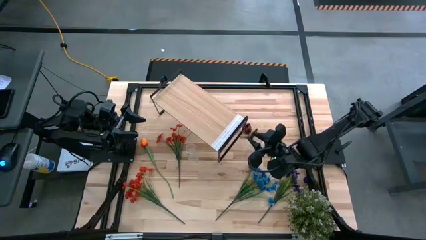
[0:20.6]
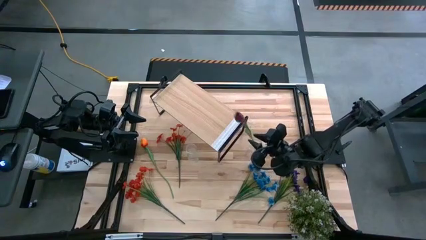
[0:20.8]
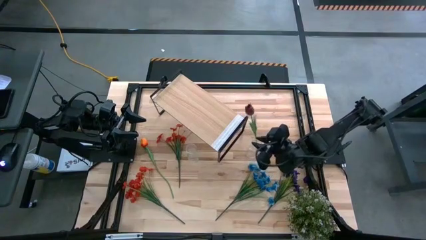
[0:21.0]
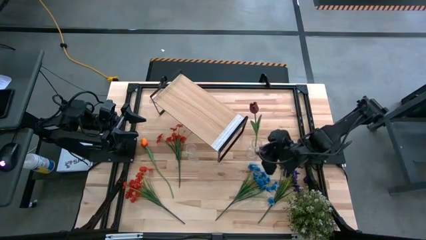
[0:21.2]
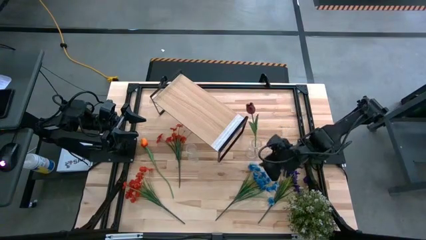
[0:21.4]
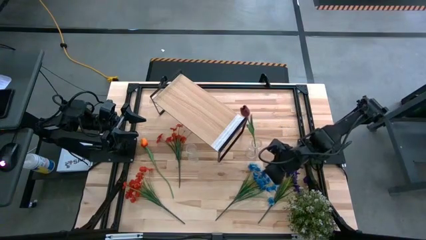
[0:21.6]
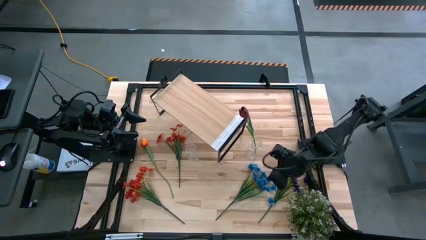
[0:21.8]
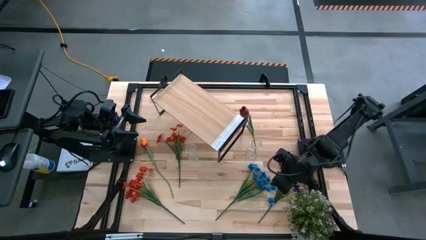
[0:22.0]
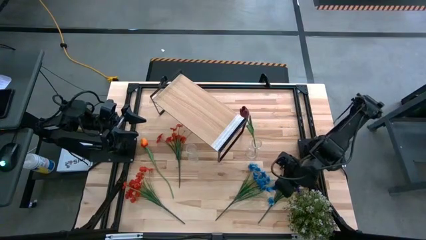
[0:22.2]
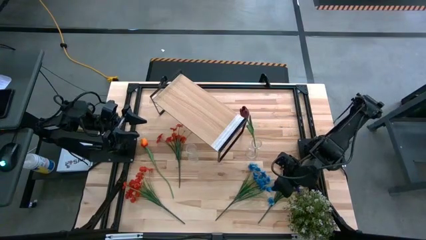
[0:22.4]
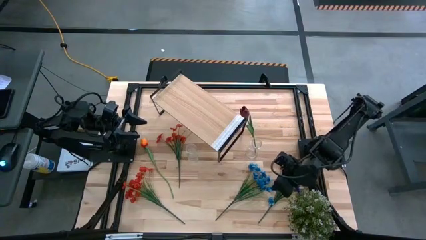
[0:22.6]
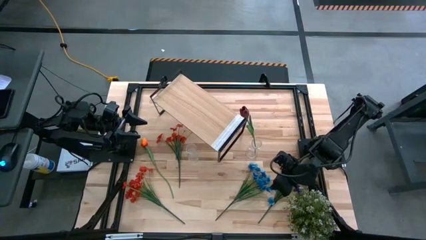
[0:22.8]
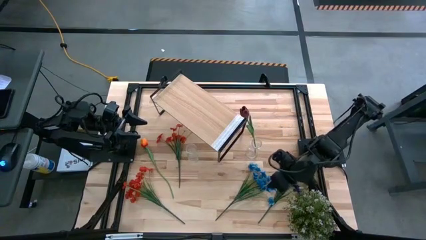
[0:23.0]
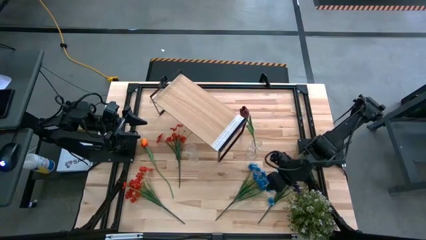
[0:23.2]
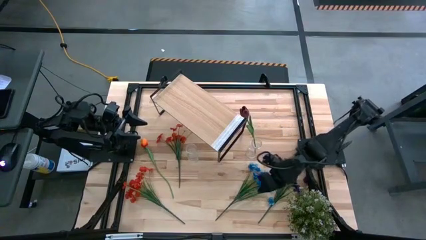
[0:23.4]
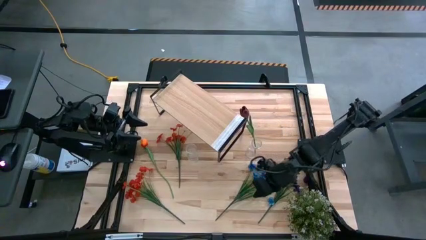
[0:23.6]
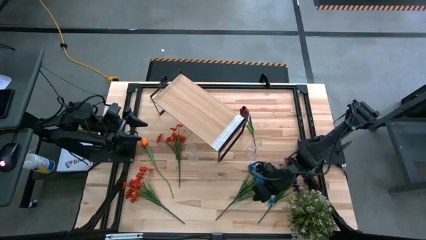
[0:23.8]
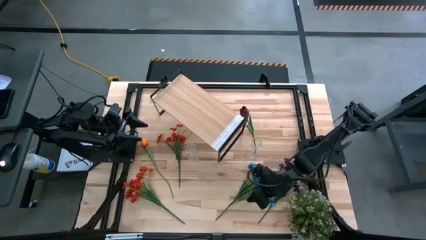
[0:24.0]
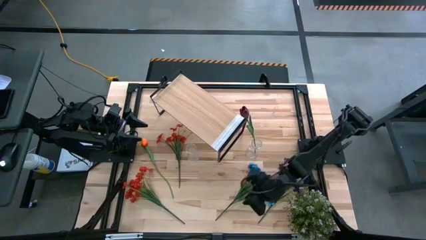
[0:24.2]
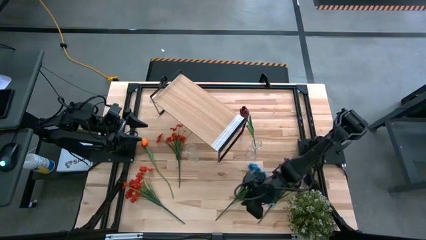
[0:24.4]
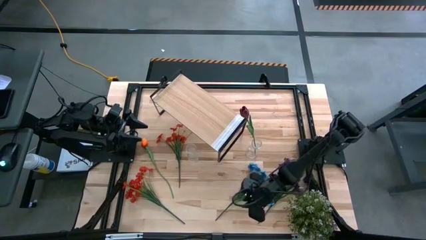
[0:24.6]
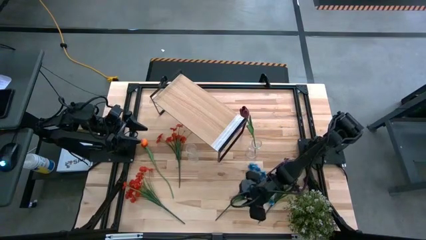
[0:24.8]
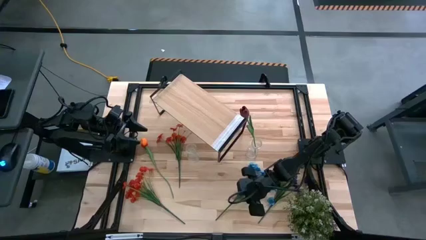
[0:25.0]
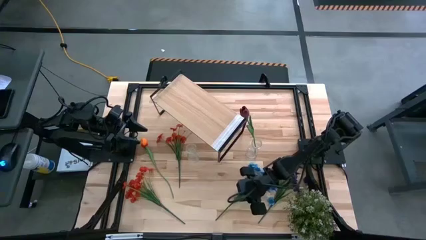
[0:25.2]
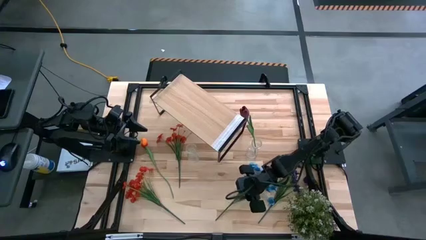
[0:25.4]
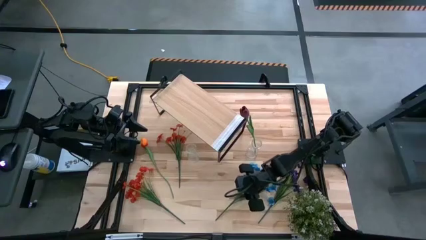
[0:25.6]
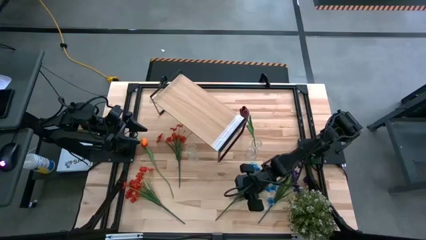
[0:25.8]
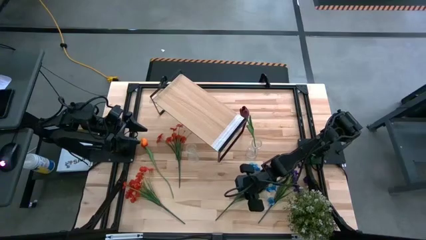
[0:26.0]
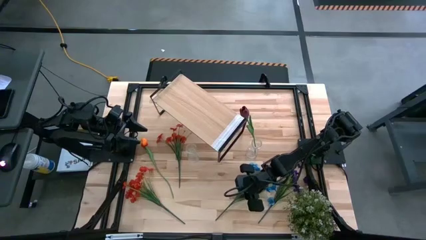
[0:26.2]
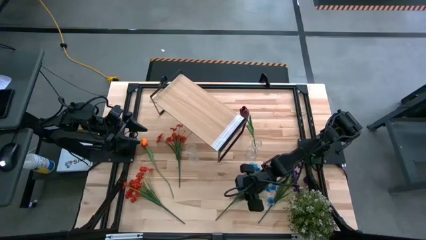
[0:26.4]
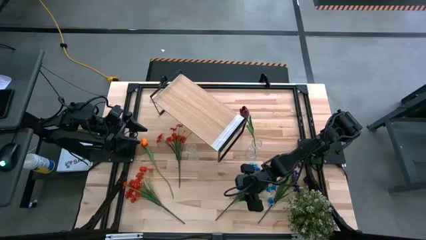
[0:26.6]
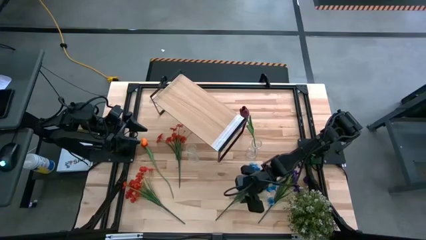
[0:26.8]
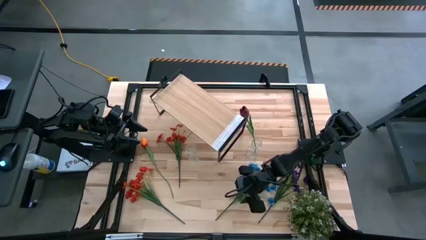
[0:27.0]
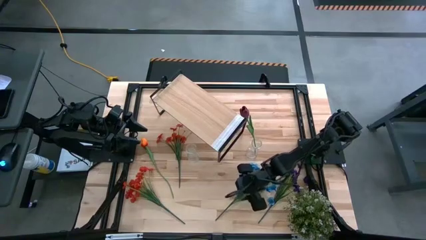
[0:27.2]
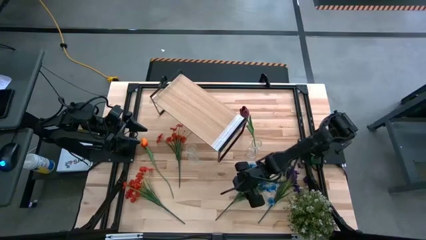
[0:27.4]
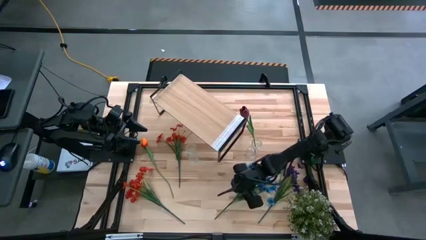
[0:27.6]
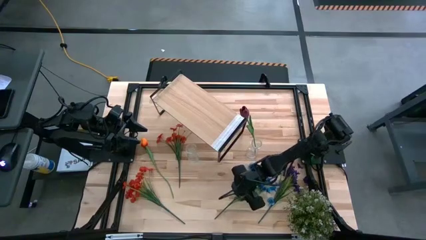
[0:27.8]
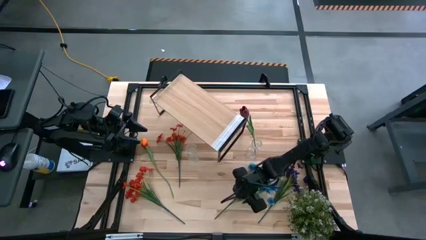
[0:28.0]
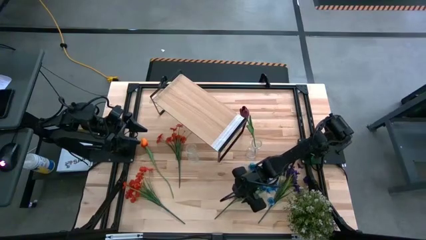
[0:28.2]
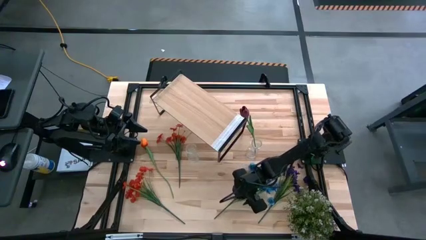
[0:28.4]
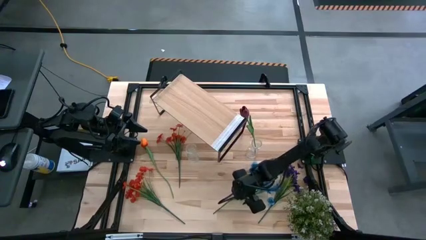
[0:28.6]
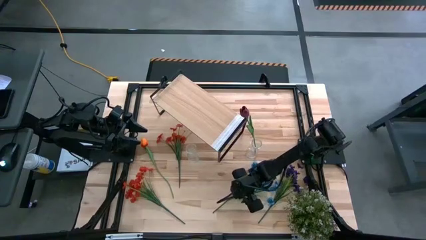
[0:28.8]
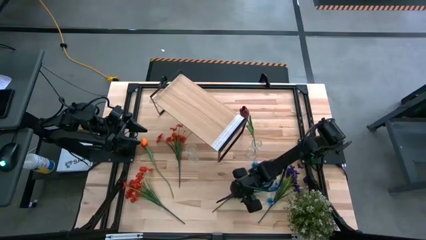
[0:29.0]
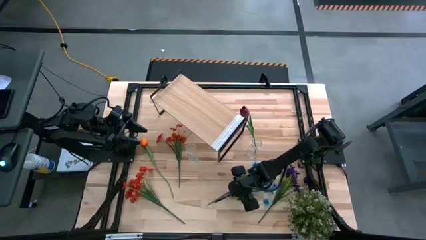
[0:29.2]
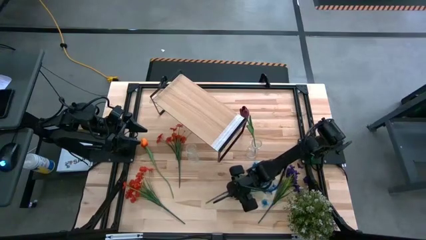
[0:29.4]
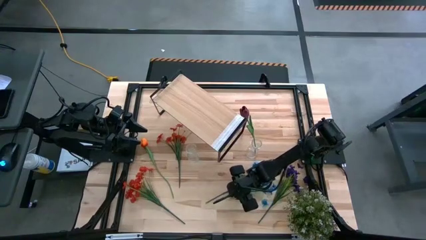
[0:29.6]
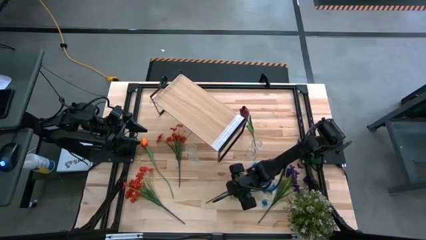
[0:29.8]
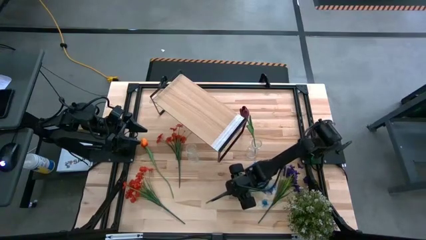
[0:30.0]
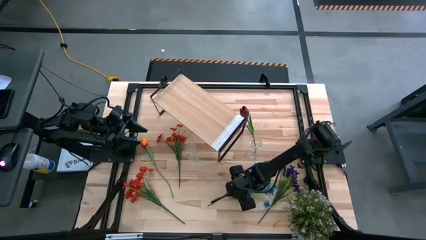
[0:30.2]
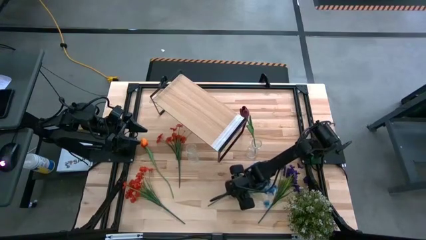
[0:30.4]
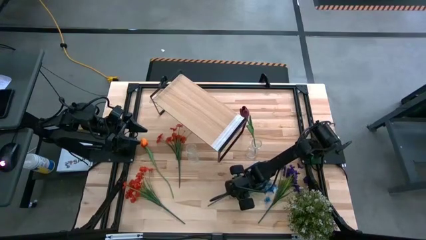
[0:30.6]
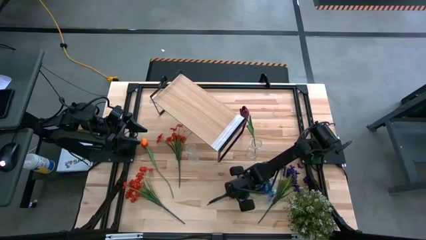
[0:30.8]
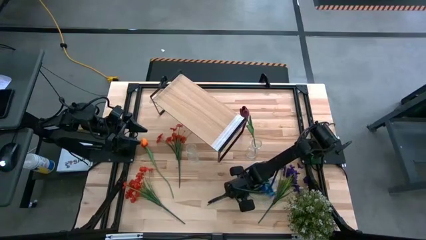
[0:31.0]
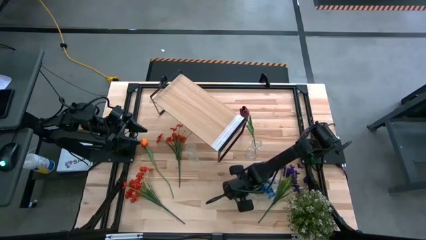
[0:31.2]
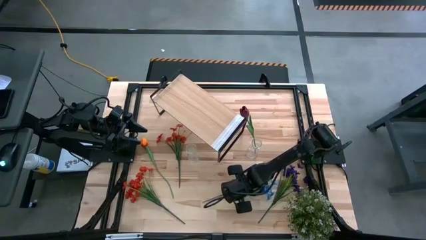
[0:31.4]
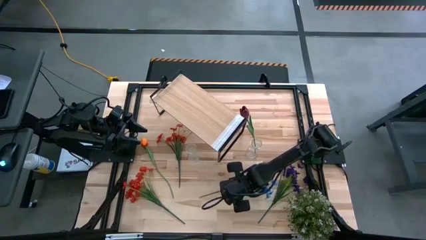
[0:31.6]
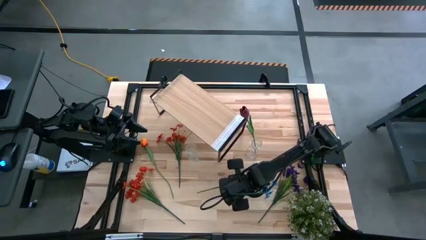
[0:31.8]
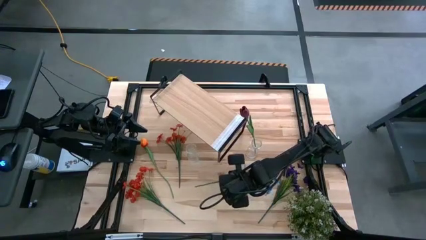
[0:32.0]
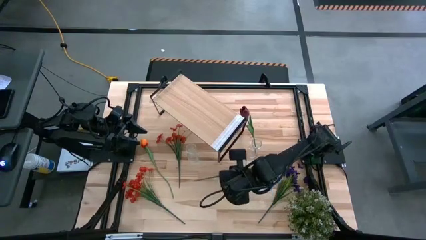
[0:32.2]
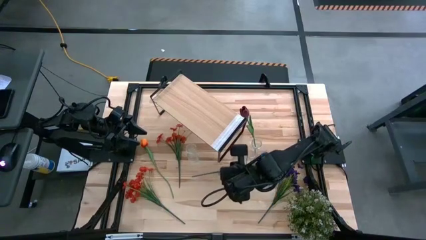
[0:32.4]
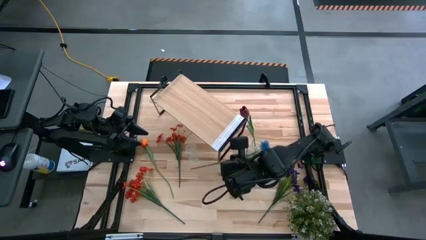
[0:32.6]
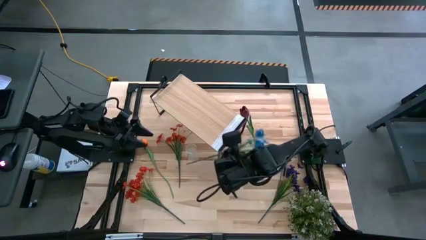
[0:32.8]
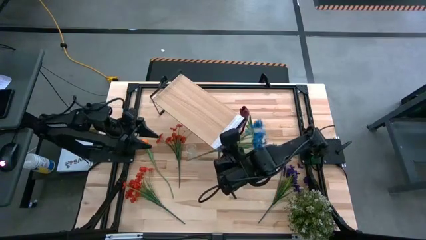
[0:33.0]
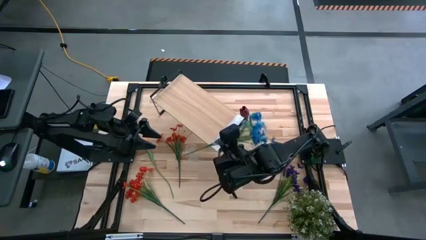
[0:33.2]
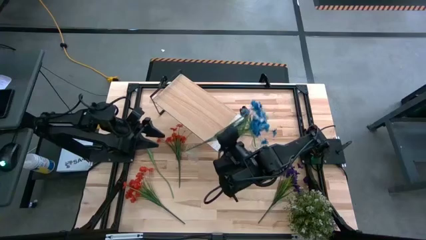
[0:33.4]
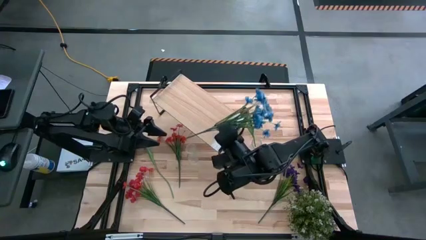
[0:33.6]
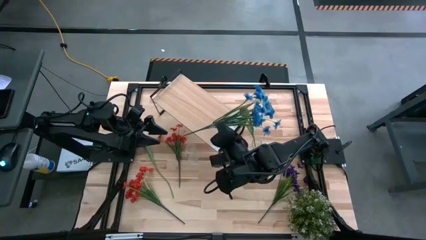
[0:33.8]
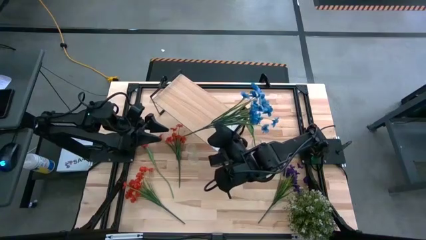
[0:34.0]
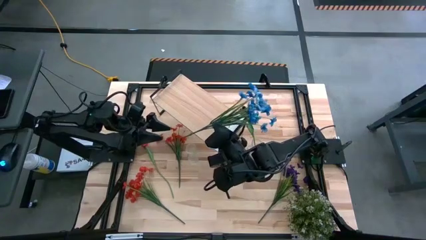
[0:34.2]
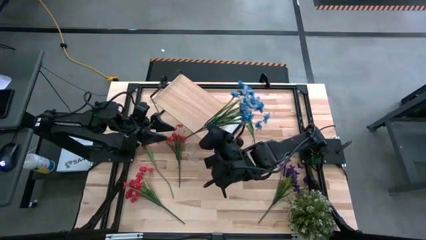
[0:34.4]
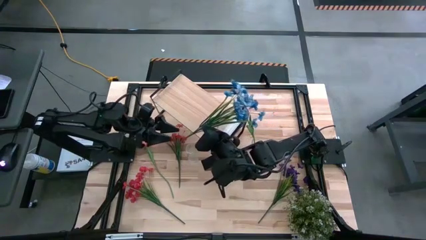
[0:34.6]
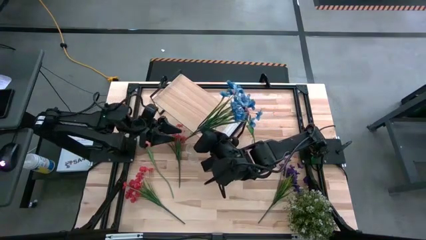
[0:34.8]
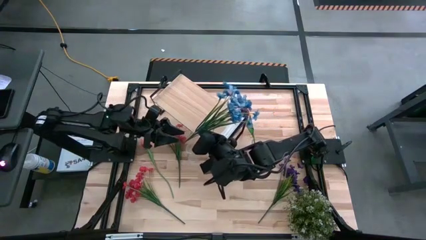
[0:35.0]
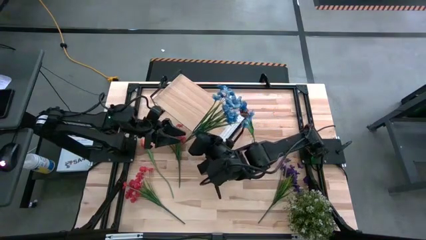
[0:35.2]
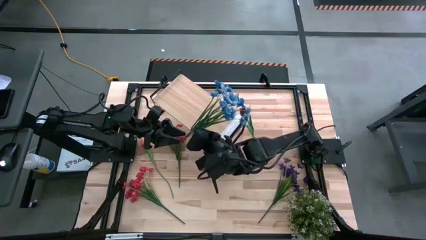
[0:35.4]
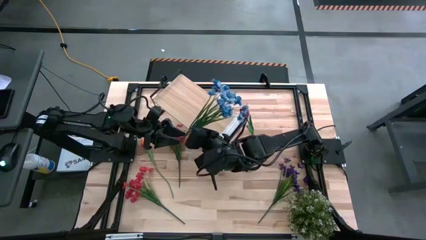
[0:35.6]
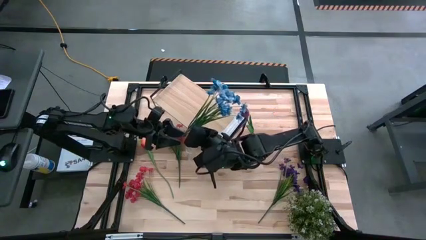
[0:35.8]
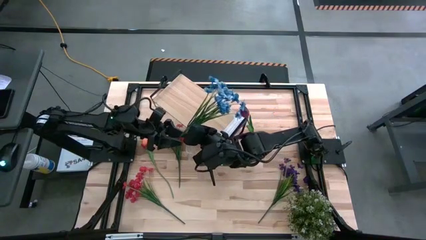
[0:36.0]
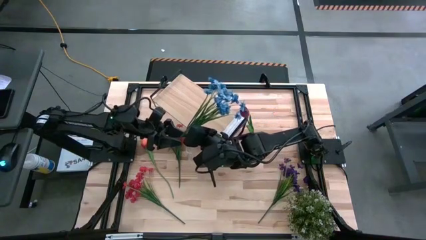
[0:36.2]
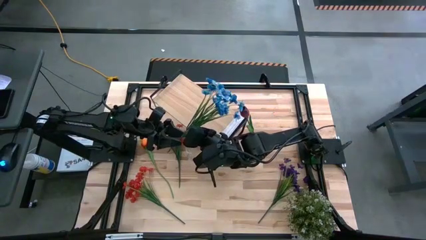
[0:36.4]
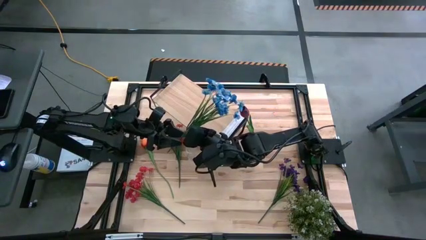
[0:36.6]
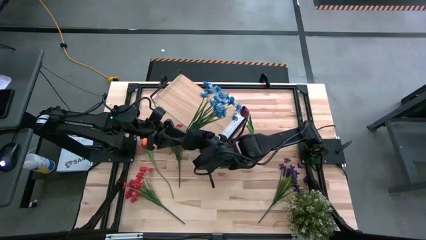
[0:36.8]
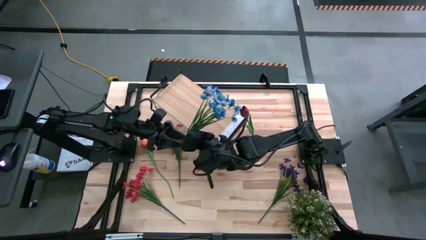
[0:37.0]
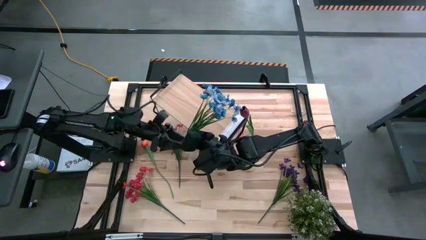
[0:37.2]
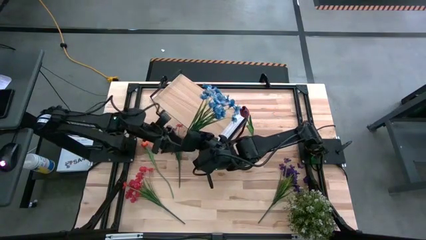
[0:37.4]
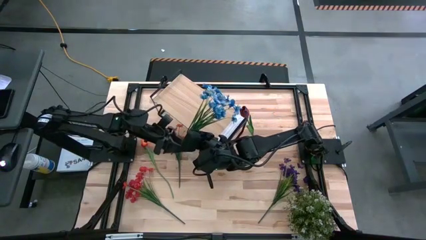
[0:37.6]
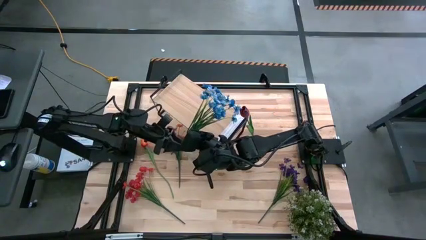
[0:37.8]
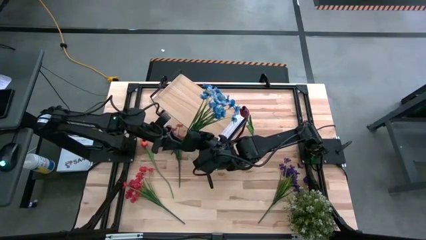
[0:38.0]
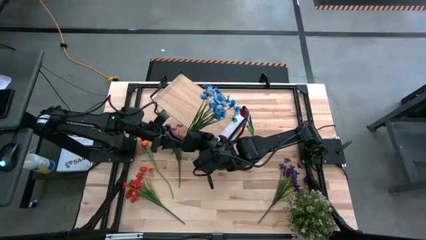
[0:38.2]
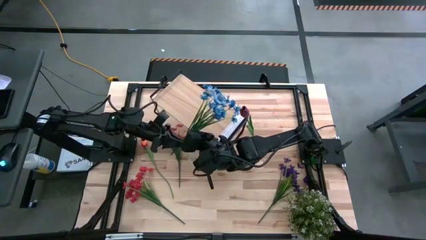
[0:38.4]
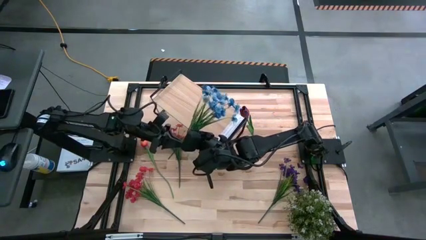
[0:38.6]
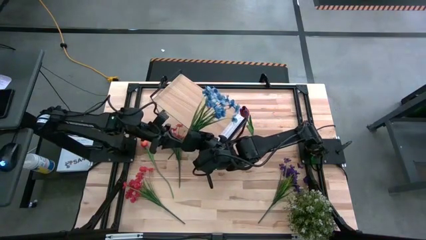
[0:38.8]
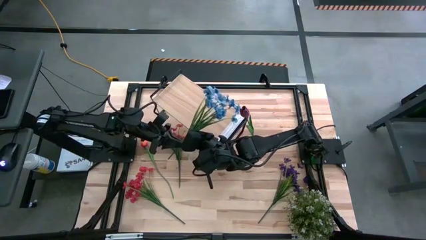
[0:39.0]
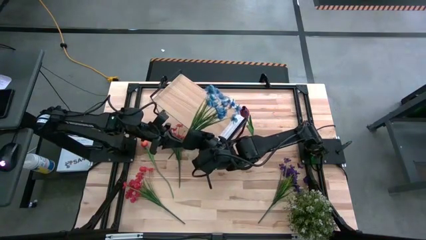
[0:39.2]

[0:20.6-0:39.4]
Task: Pick and place flowers into a vace then onto a shelf
Put the blue flowers into the right transparent flower vase
